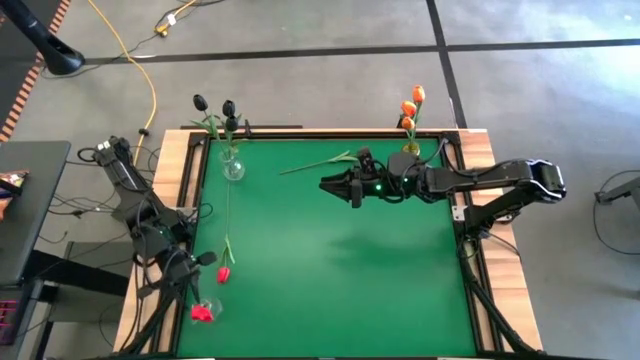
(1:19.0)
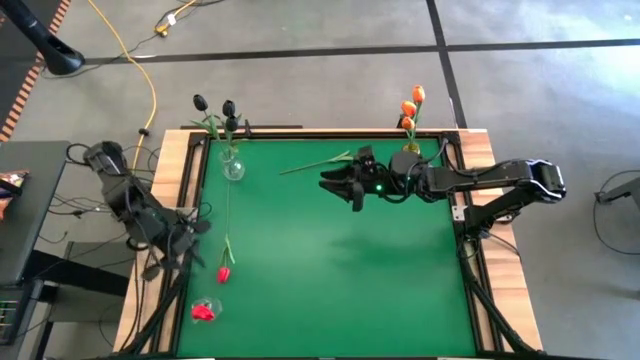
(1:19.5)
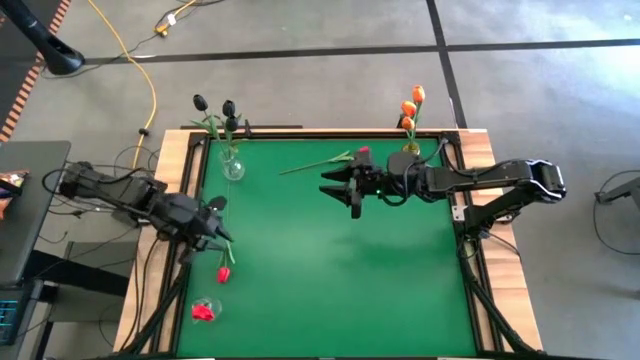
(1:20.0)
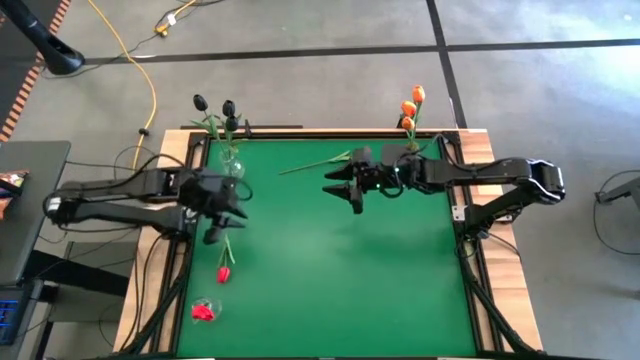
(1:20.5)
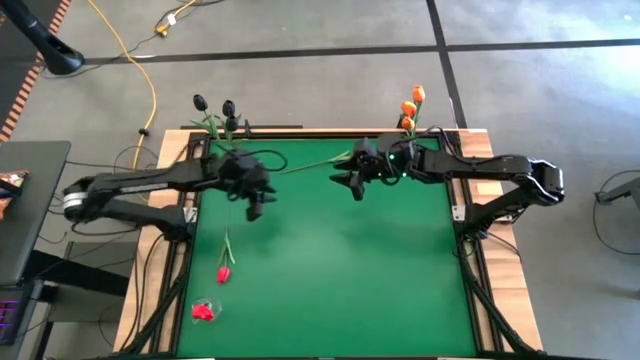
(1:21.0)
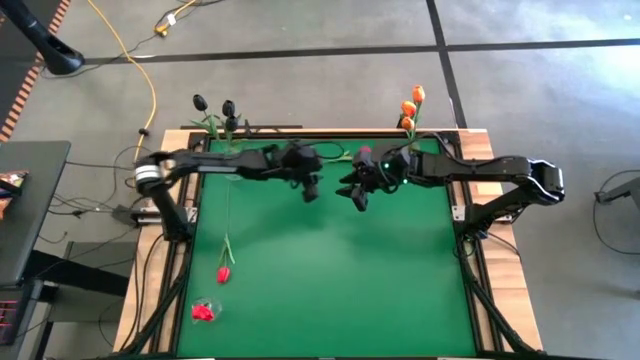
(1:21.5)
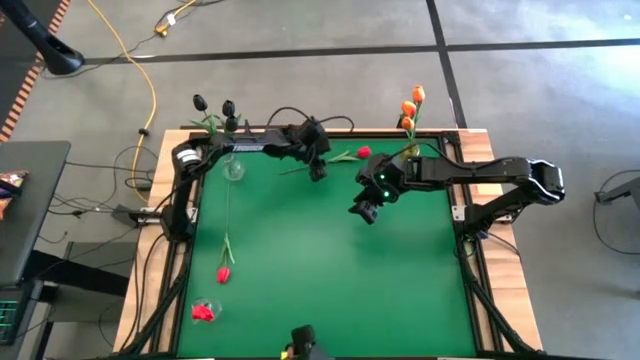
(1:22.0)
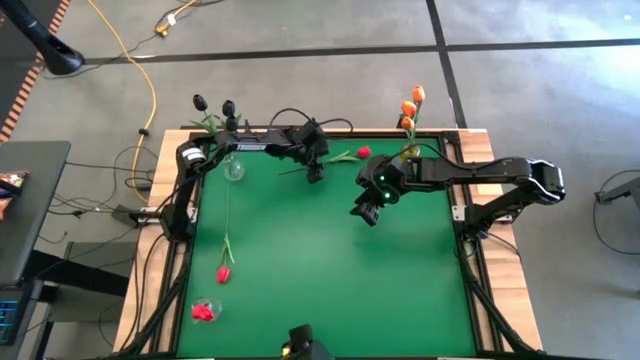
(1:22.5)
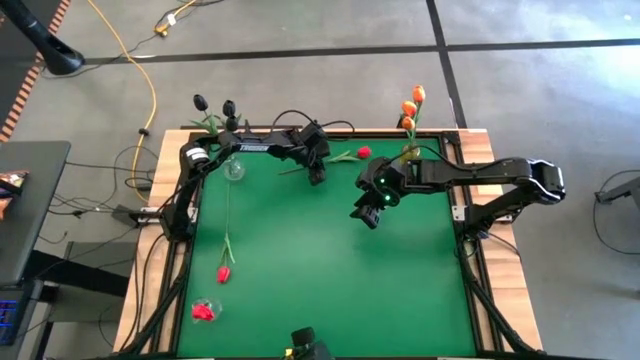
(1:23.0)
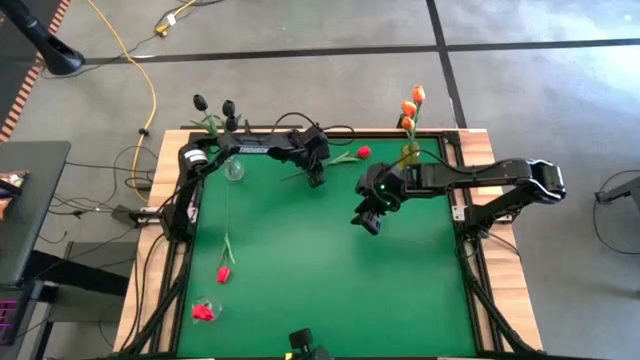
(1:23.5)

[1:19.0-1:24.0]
Task: Sort flowers into vase by color
Put the top red flower into the bottom transparent vase

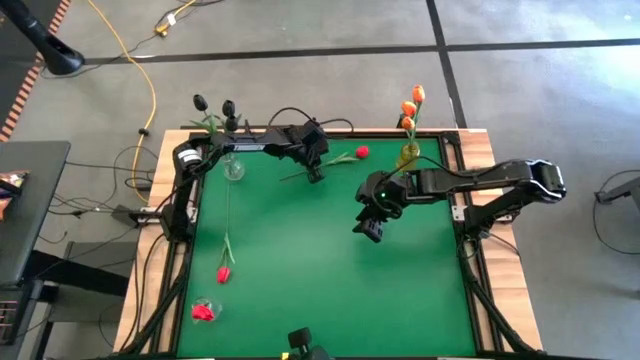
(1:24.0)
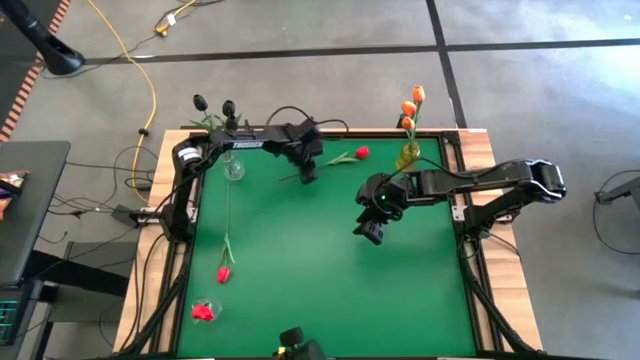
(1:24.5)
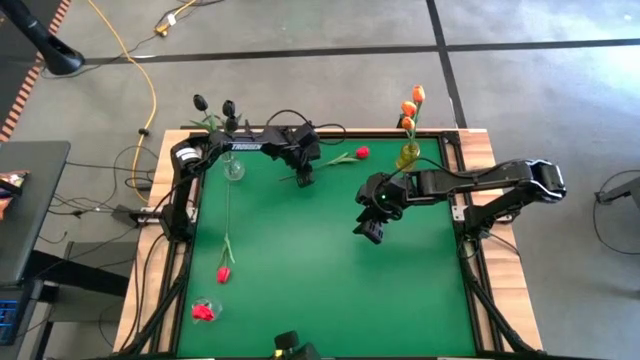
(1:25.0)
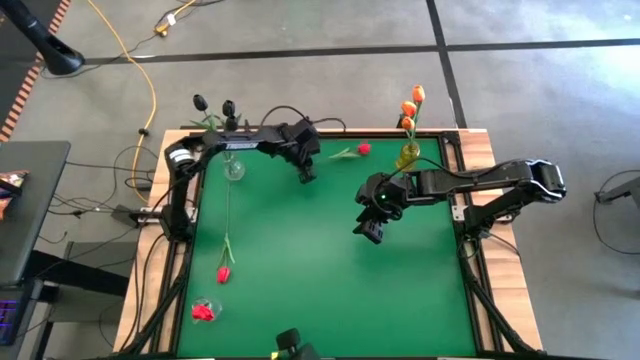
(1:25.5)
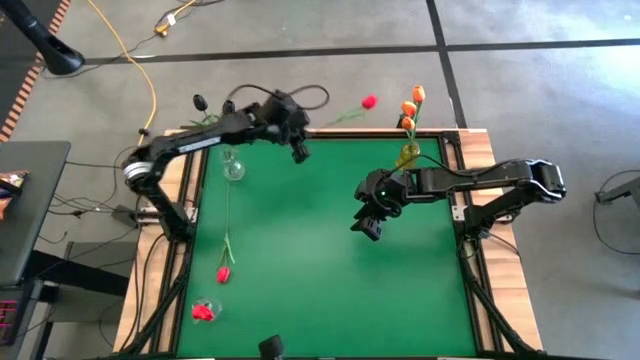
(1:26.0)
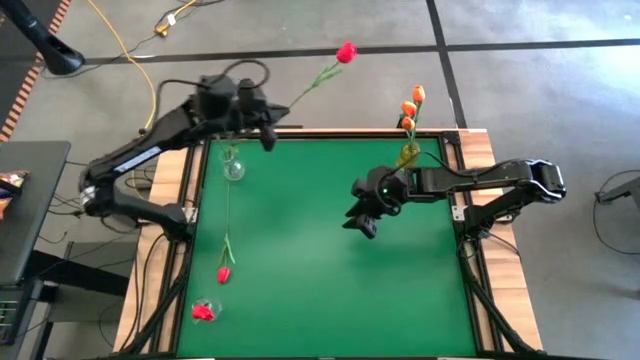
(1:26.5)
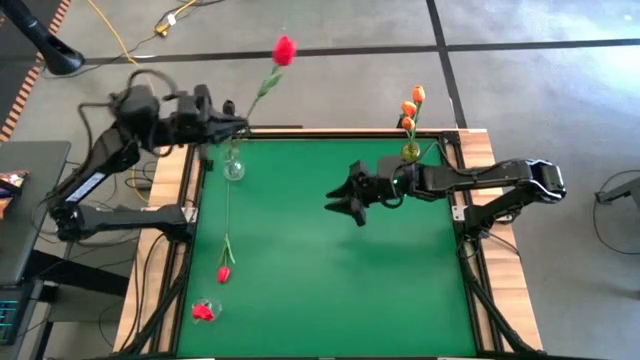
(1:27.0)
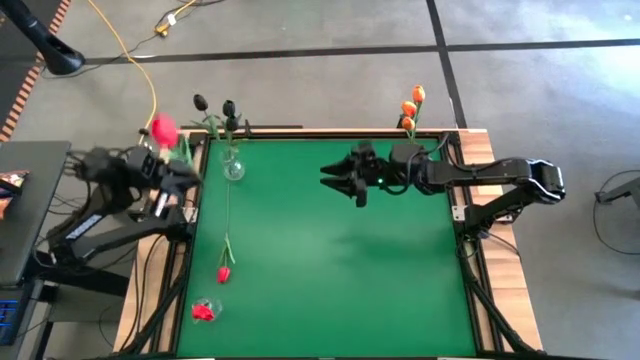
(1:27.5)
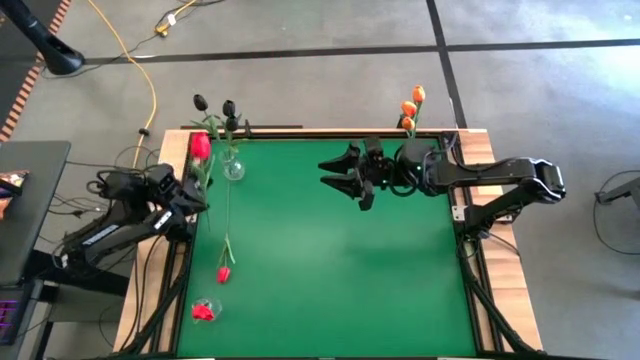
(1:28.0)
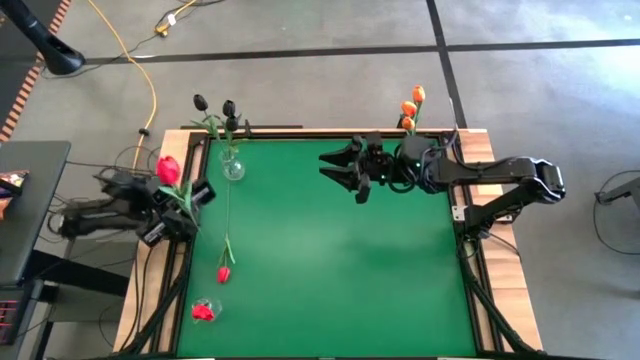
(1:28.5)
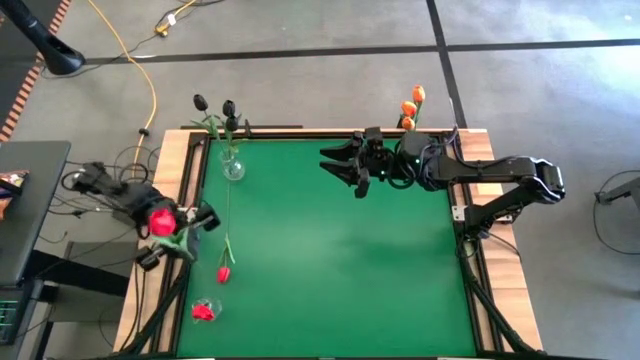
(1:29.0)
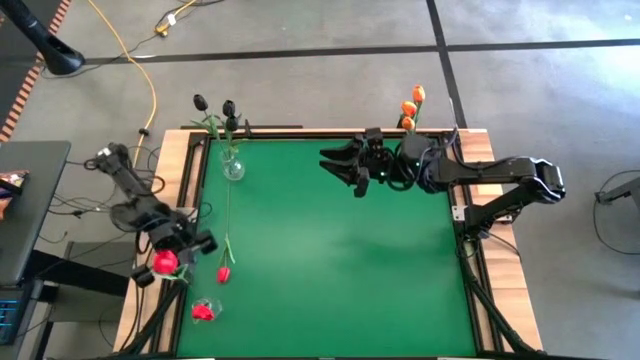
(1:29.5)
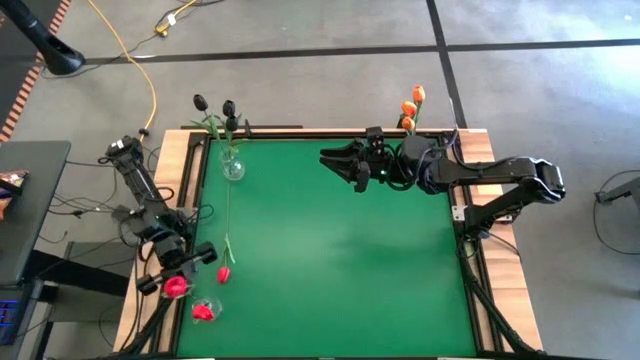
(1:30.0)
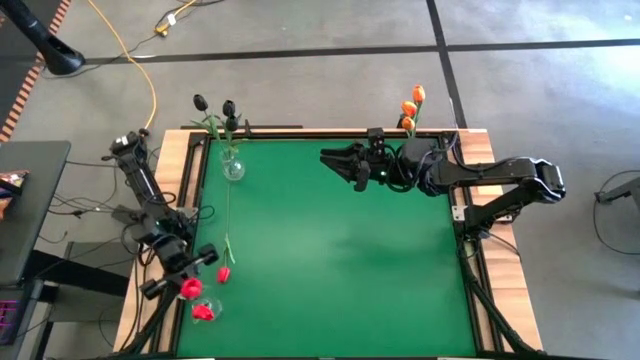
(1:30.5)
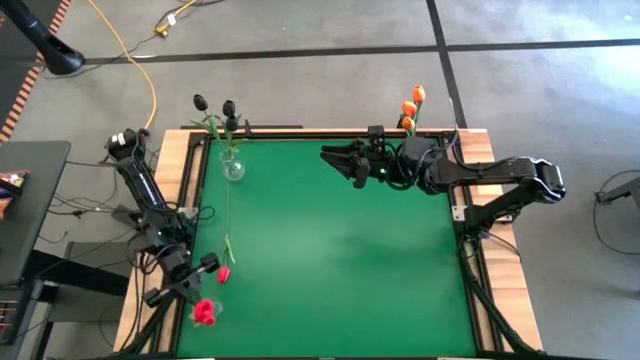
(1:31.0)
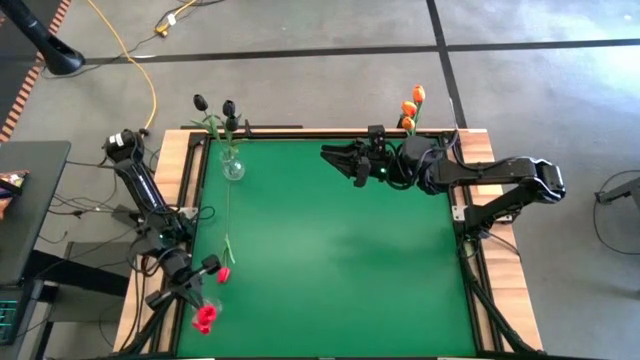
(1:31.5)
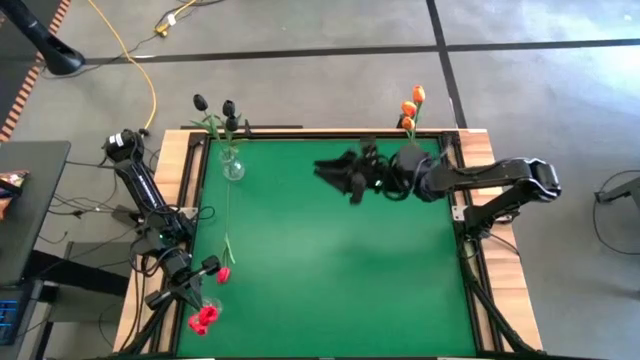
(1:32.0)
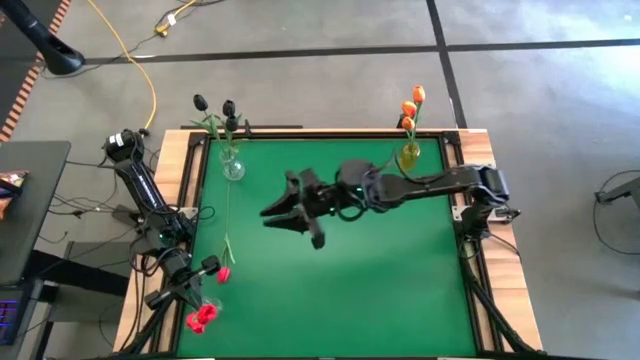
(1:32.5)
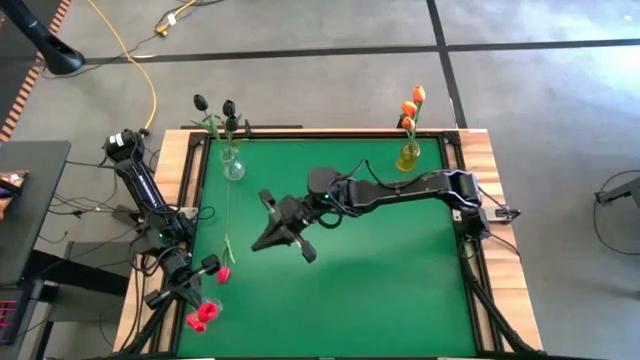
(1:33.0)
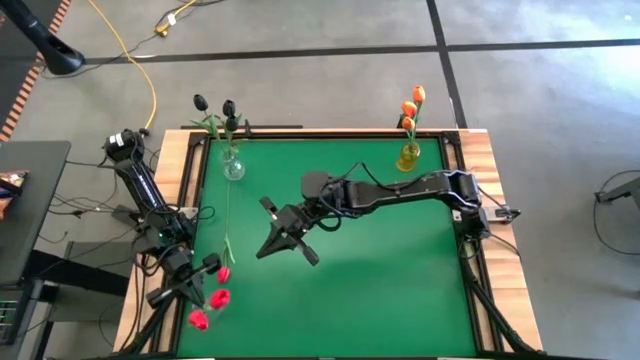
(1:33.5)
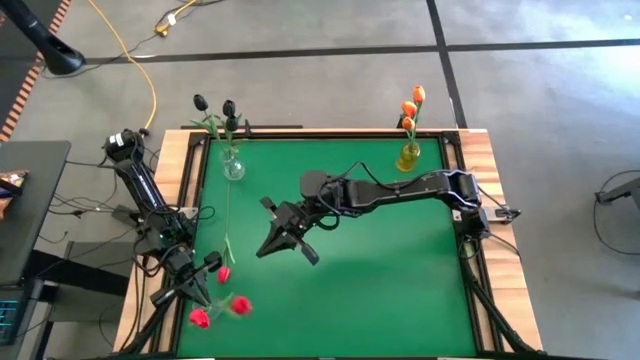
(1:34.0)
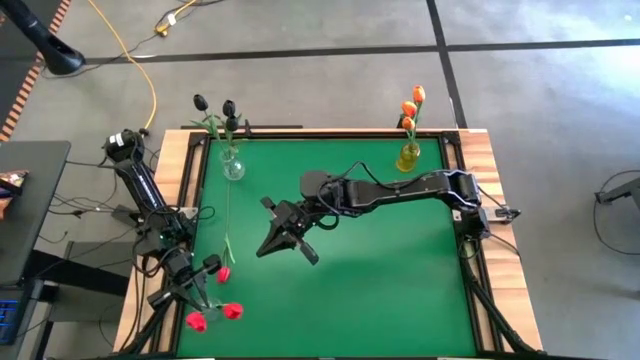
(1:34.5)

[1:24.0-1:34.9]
Put the top red flower into the bottom left transparent vase

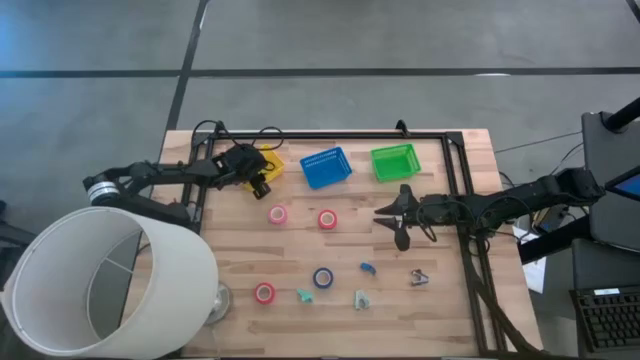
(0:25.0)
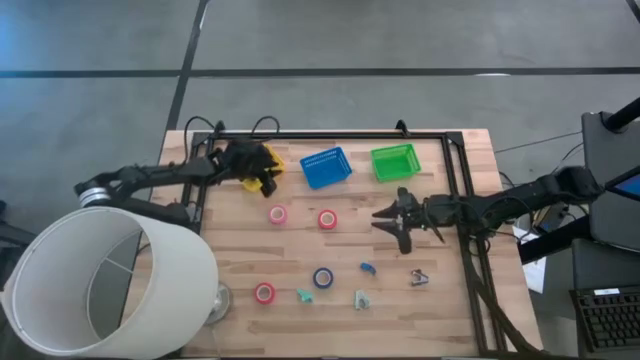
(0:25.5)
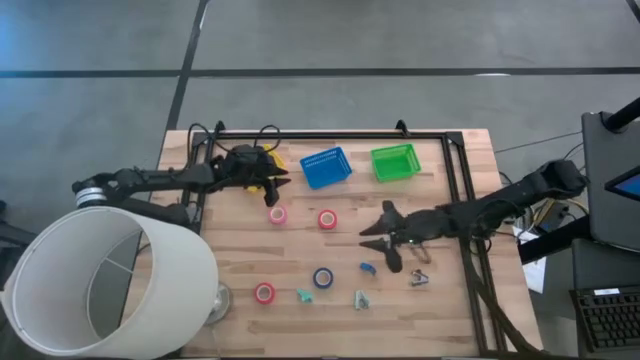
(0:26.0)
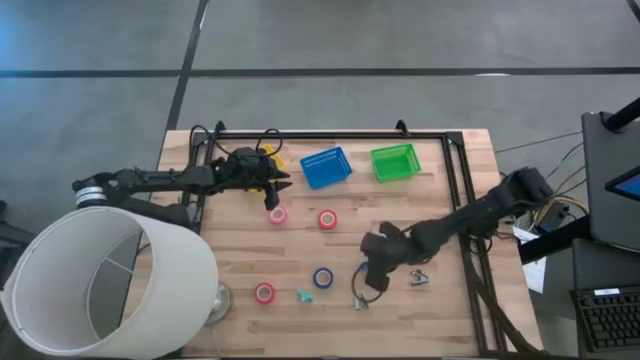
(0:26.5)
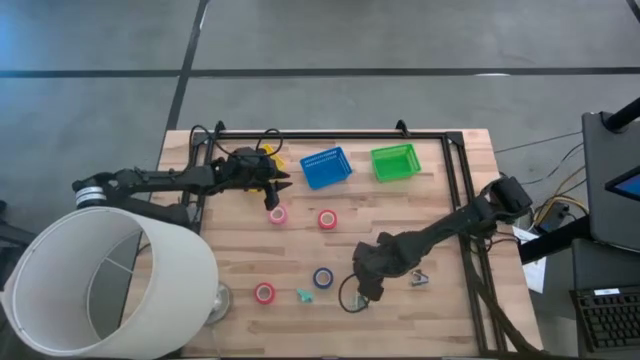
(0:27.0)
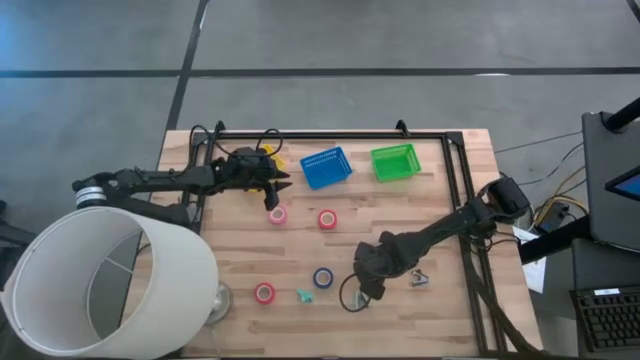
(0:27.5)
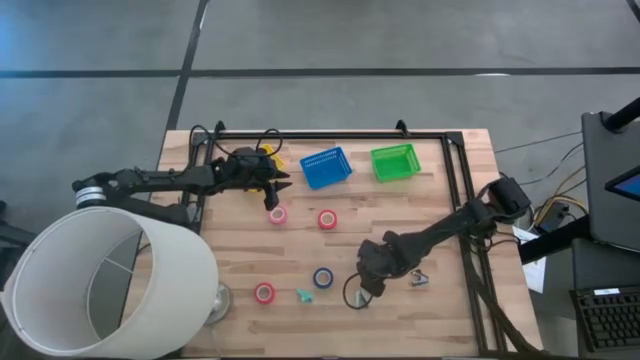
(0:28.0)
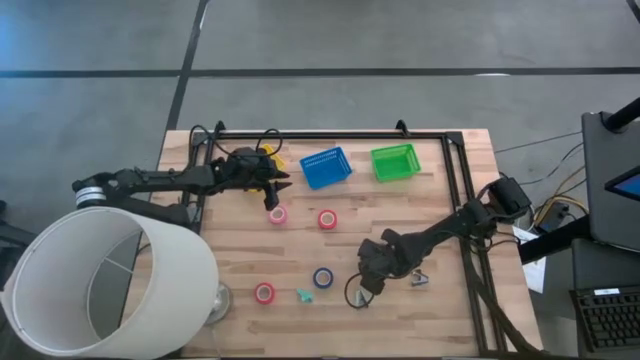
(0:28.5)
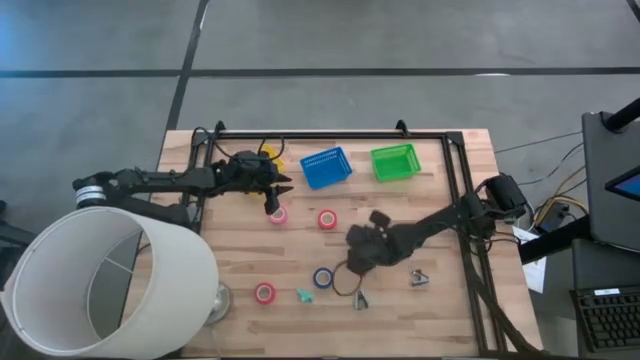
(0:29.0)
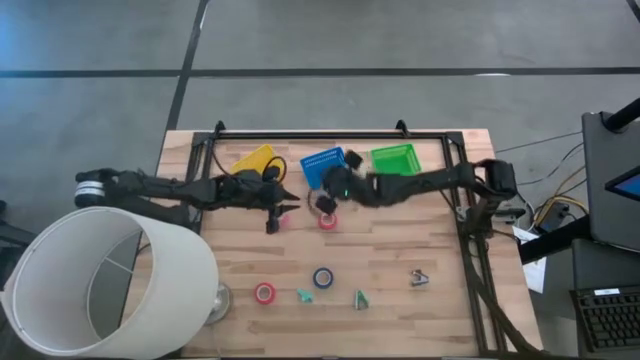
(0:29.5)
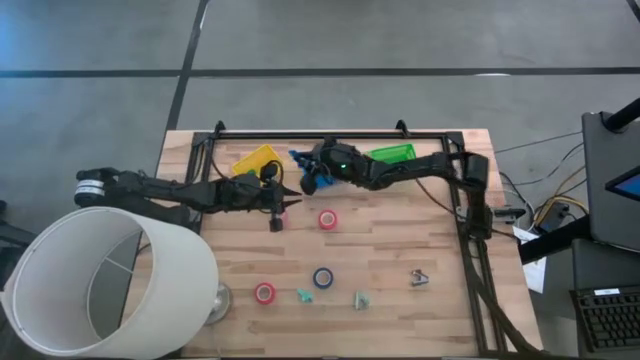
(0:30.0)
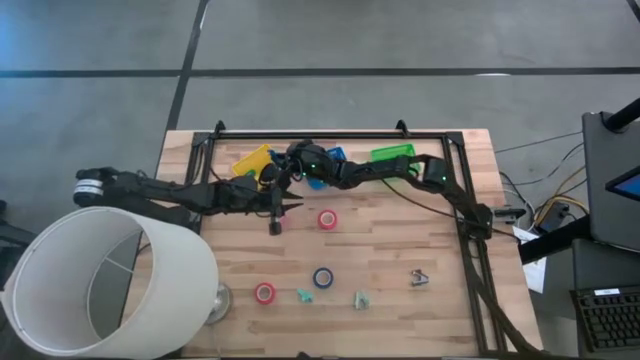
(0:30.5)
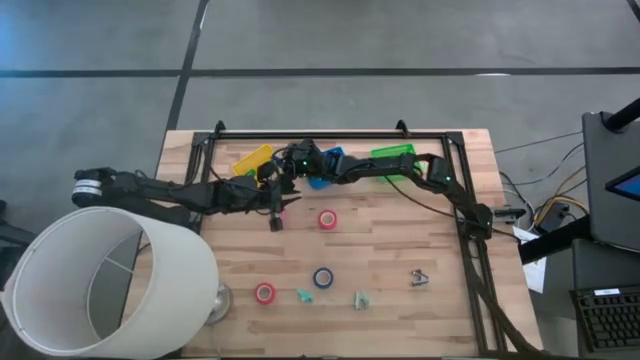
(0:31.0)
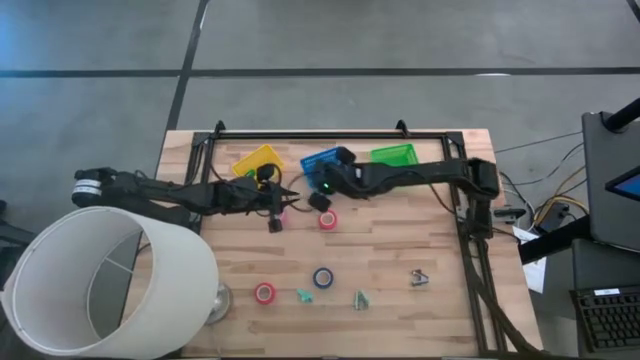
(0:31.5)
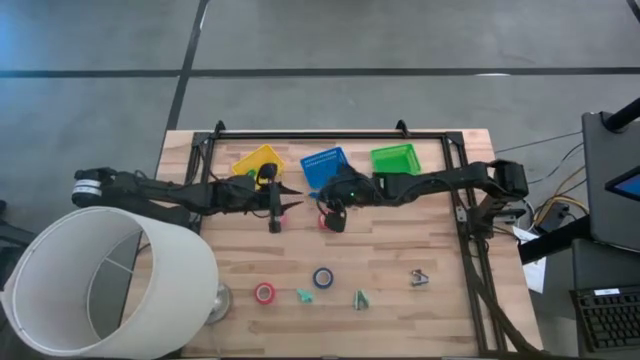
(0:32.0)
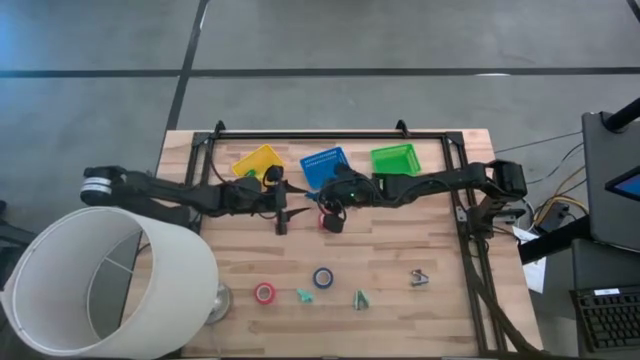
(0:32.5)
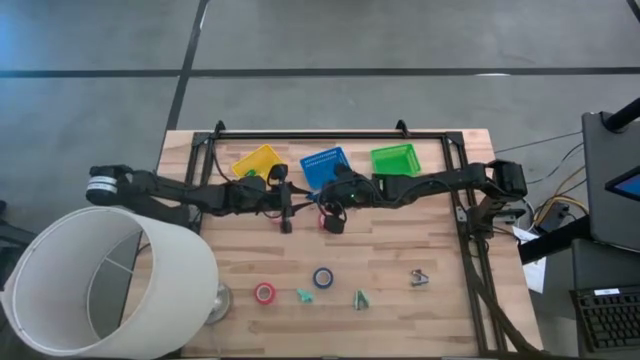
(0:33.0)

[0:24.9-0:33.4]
Task: Pick and place Stapler, Stapler remover, tape
Put the blue stapler into the yellow basket
